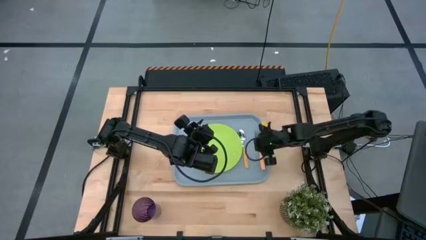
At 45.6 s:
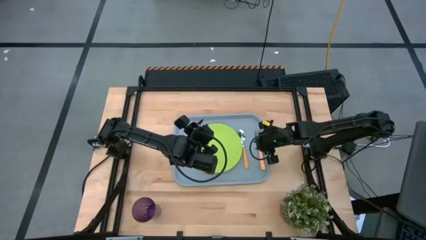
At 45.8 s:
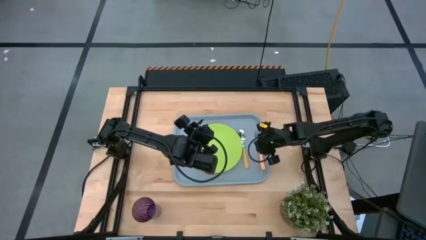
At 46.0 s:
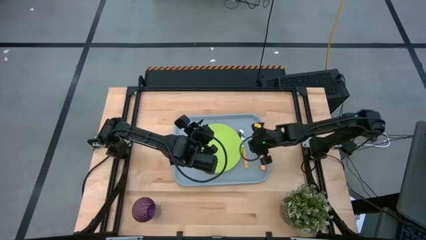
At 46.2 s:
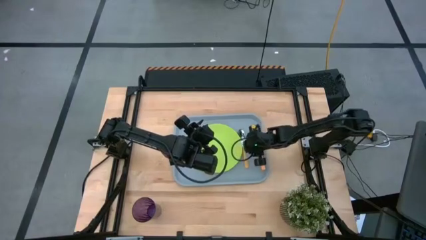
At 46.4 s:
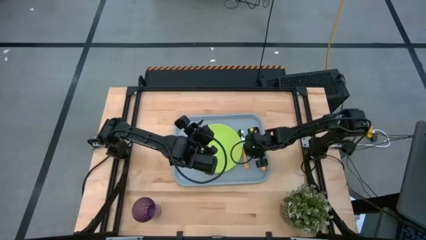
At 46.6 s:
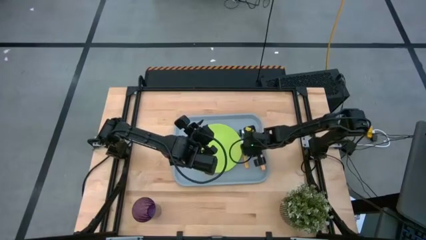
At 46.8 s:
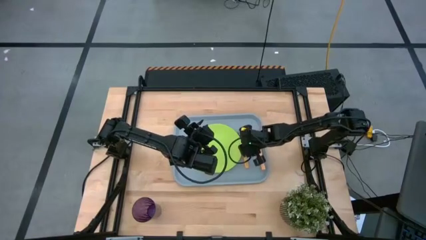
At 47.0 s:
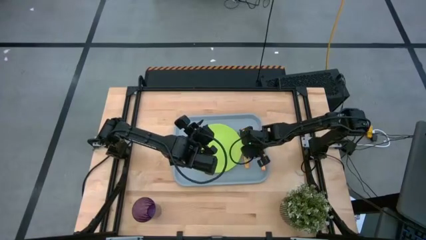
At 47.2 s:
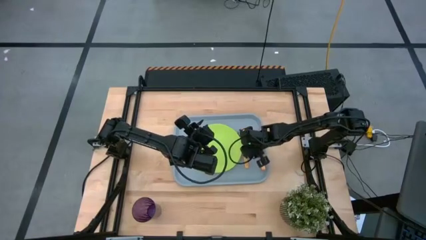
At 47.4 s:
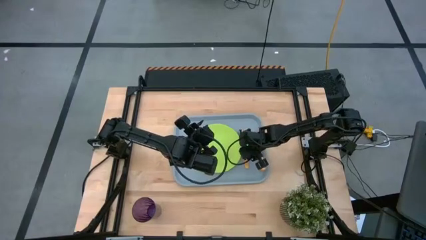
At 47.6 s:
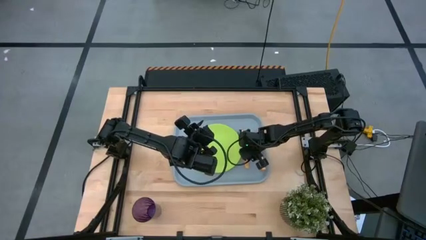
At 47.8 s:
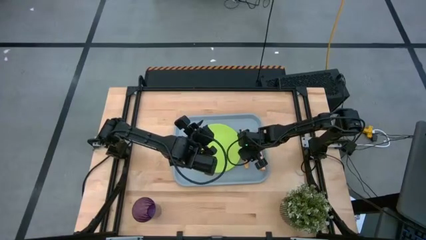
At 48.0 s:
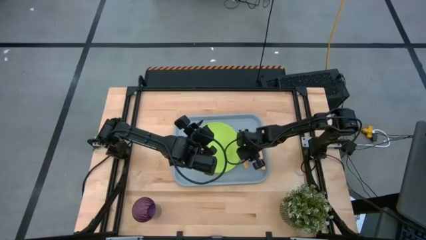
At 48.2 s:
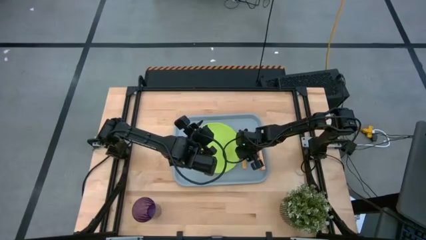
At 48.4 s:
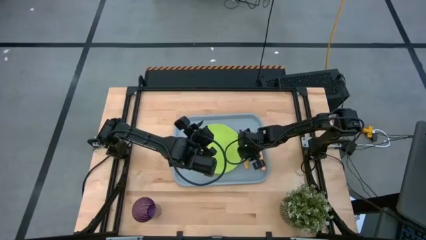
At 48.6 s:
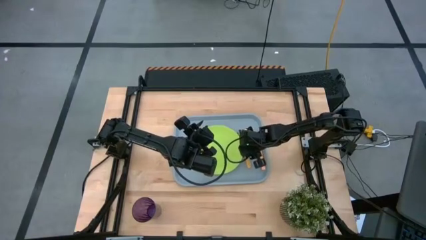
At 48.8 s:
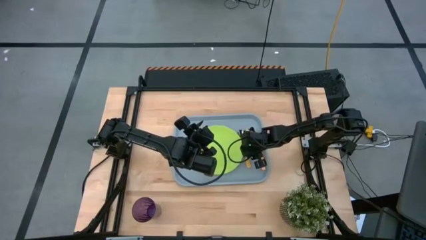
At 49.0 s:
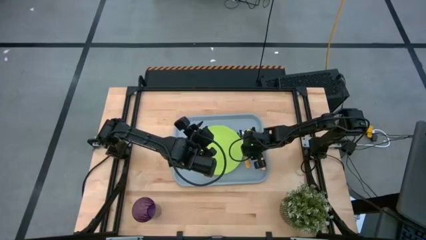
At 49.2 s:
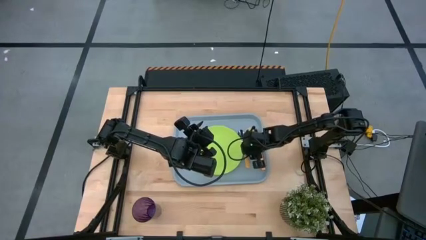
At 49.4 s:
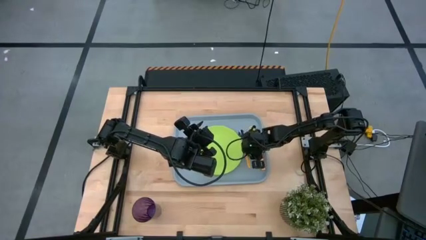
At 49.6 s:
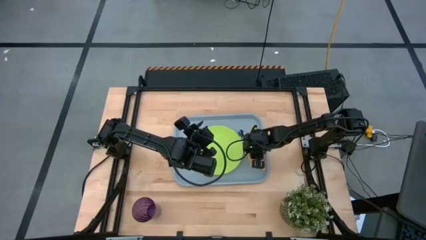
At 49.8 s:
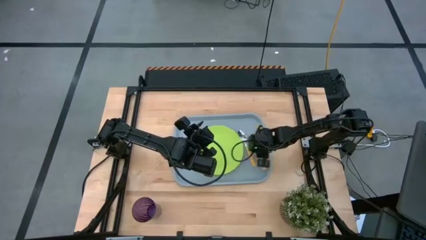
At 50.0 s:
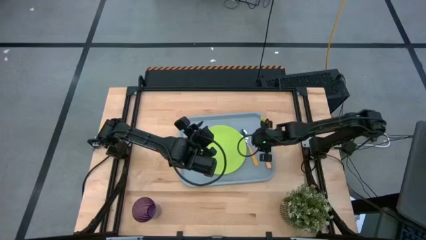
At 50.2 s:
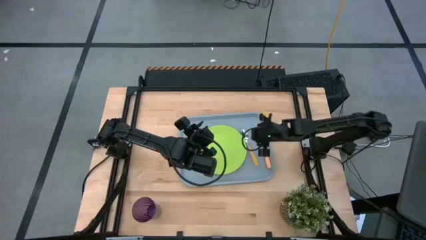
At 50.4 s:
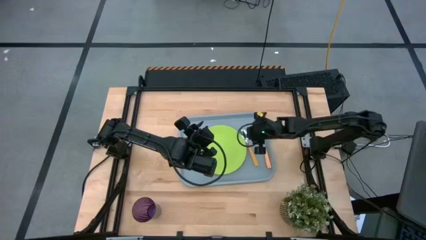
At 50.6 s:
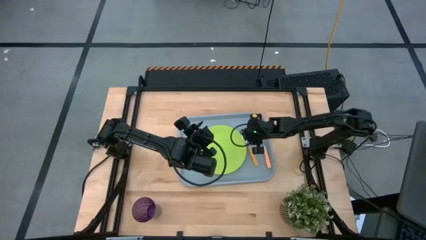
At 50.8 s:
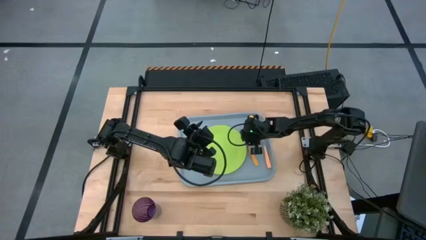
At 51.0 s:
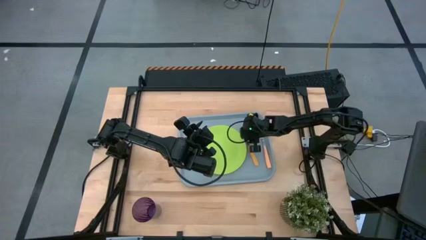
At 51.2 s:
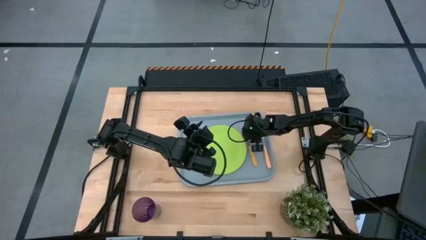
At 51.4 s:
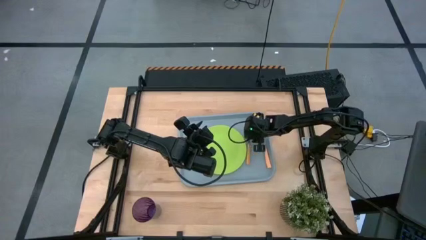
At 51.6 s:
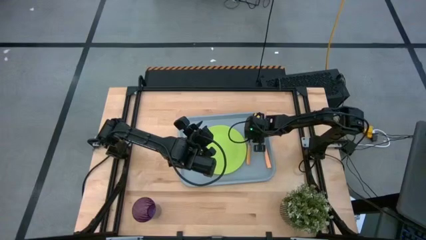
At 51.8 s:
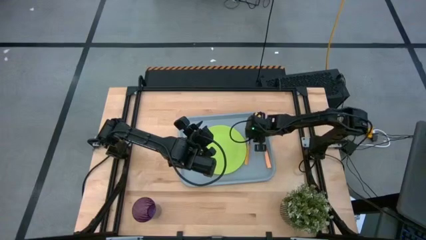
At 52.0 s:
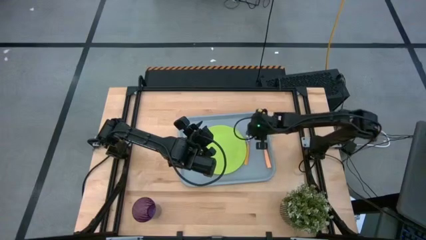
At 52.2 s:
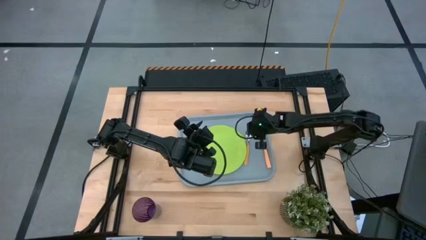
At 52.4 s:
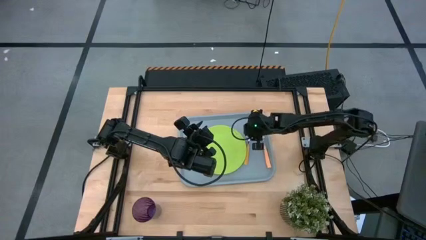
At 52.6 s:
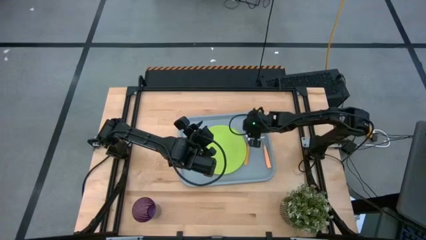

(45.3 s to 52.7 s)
Task: Pick and place plate/cup/fork/spoon on tray
Adjust the yellow spoon on the gray serving tray

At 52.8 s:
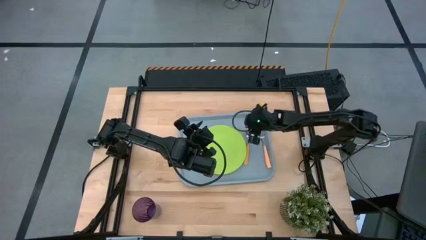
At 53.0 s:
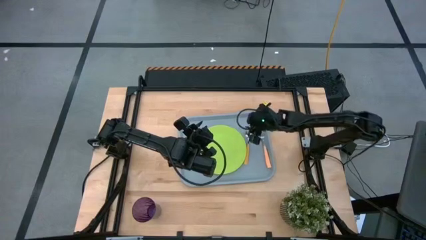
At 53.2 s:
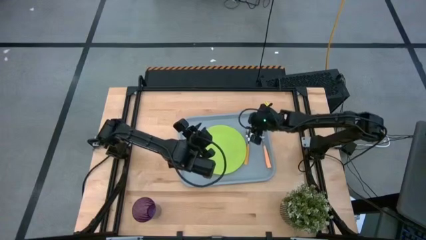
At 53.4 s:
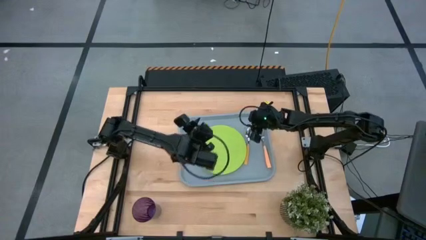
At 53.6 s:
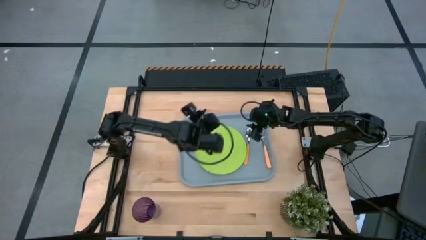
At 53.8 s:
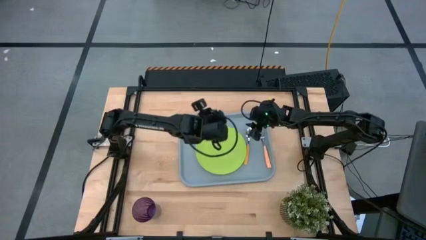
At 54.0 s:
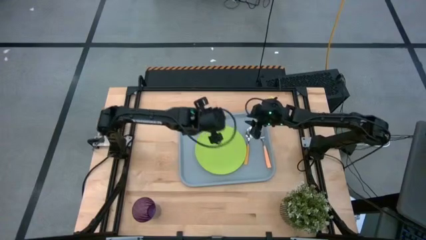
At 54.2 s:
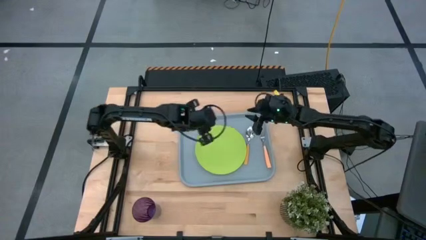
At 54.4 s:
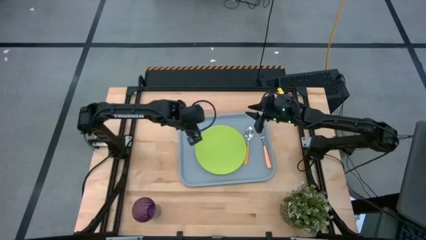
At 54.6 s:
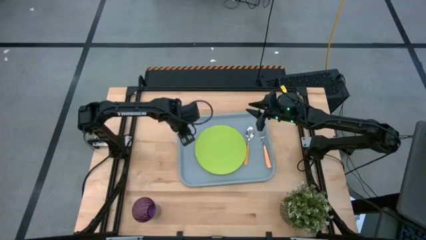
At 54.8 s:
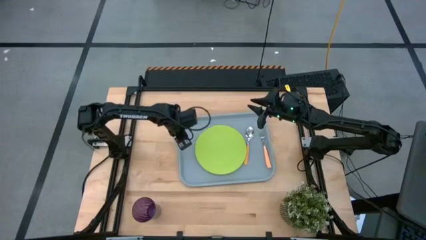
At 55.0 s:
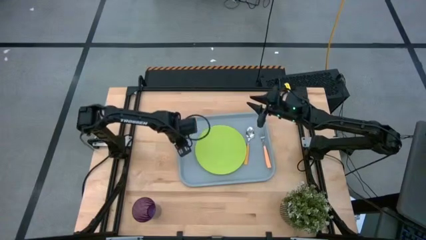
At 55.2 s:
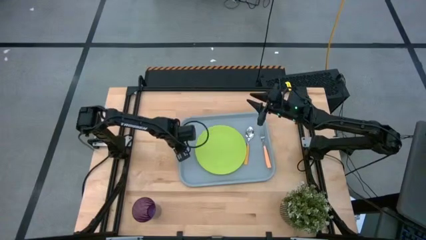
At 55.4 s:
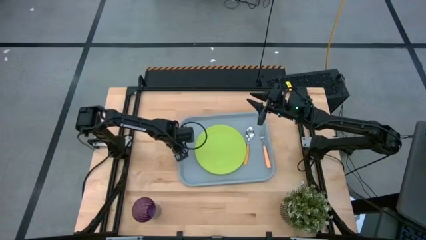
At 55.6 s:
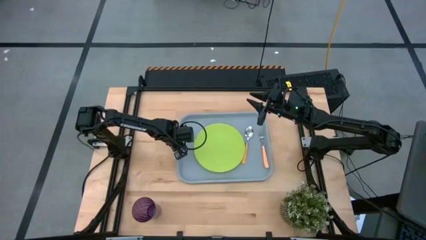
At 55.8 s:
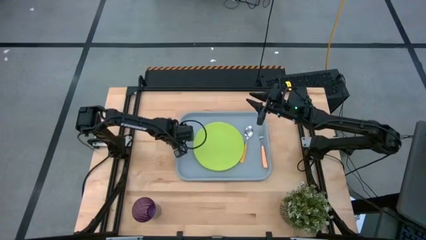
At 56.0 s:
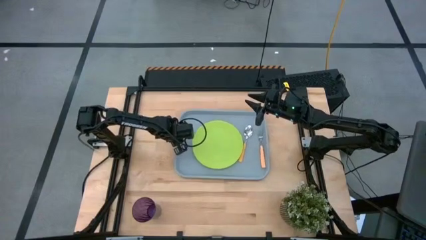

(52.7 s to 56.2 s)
Adjust the gray serving tray to the center of the table
